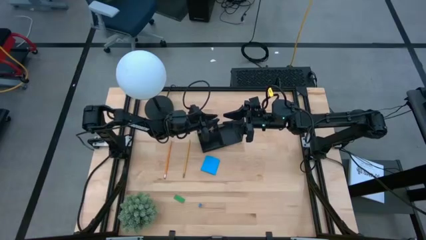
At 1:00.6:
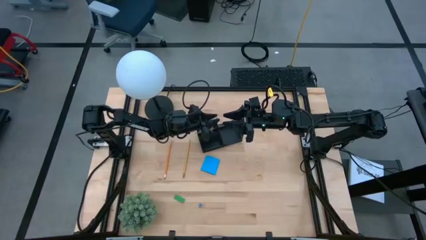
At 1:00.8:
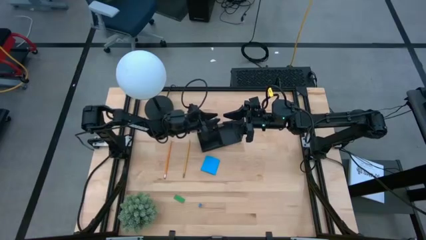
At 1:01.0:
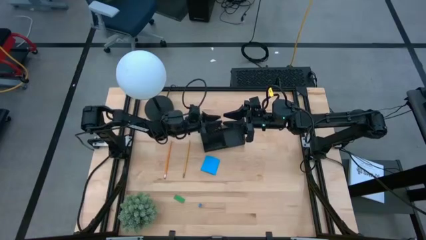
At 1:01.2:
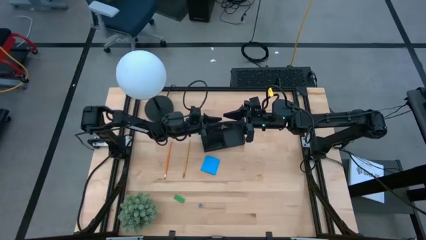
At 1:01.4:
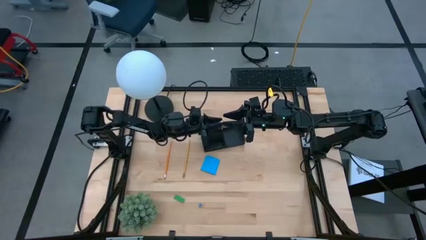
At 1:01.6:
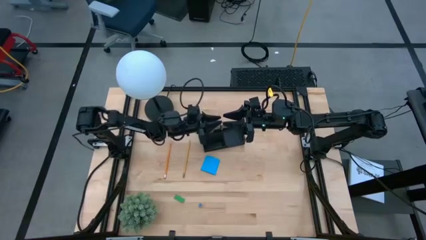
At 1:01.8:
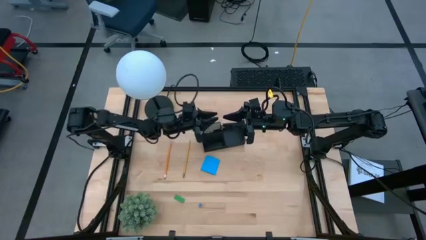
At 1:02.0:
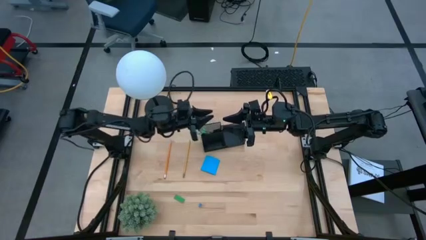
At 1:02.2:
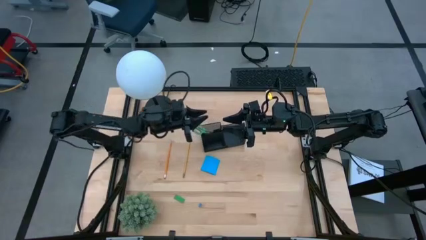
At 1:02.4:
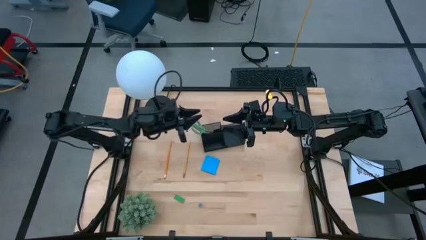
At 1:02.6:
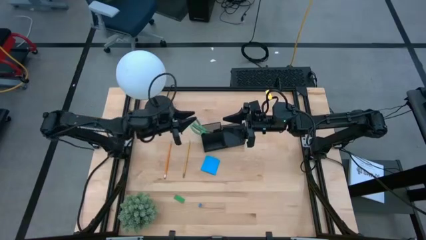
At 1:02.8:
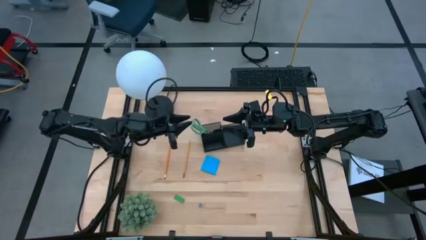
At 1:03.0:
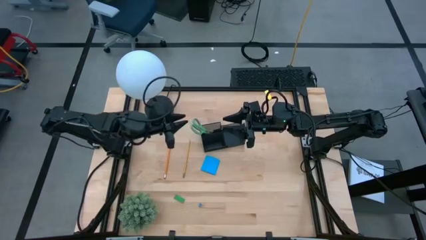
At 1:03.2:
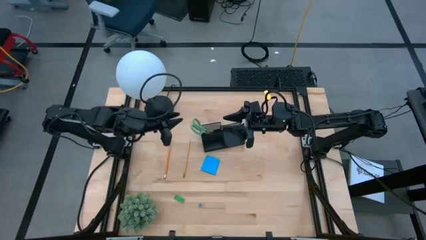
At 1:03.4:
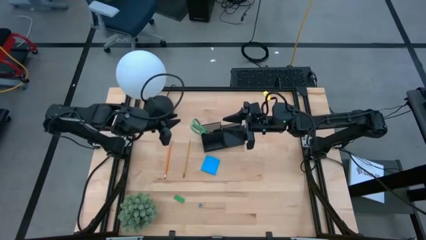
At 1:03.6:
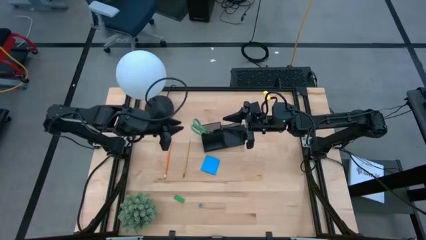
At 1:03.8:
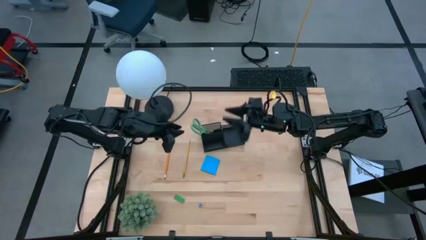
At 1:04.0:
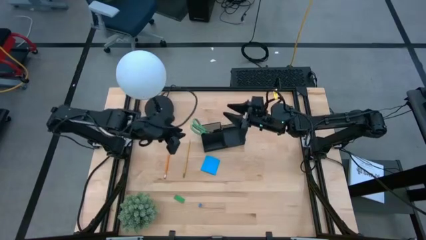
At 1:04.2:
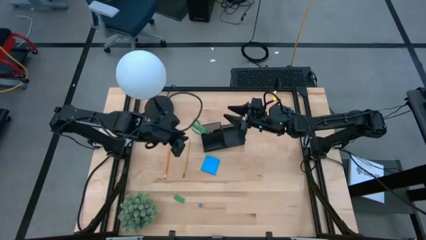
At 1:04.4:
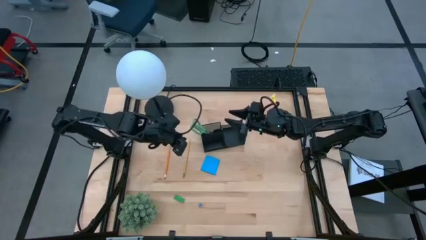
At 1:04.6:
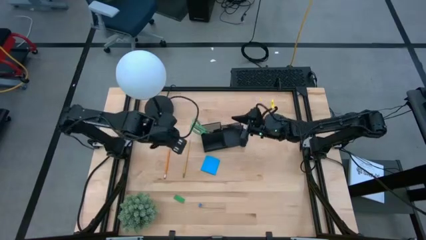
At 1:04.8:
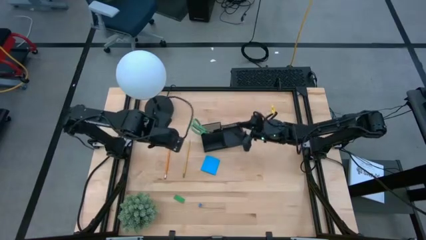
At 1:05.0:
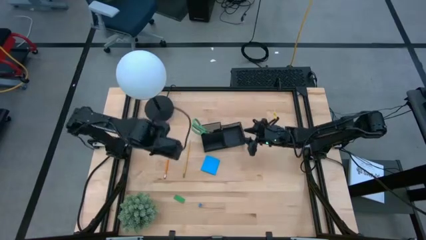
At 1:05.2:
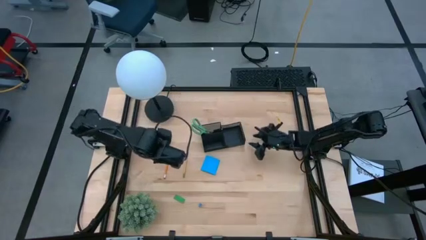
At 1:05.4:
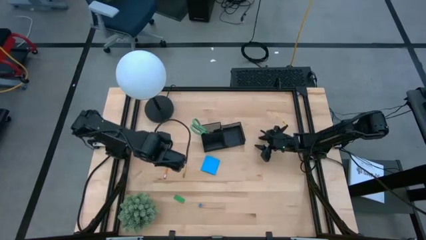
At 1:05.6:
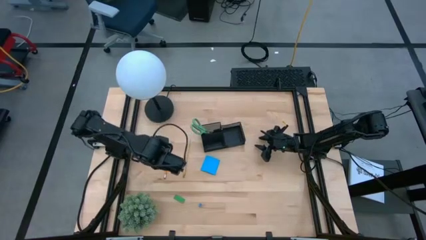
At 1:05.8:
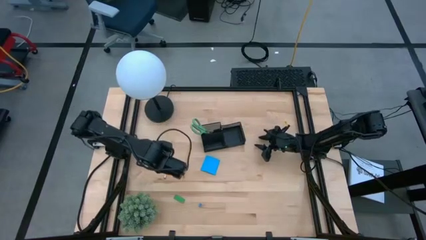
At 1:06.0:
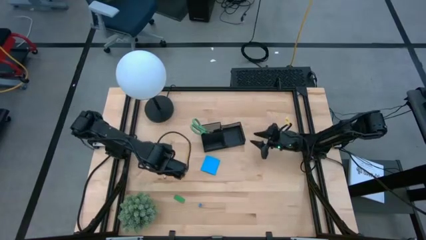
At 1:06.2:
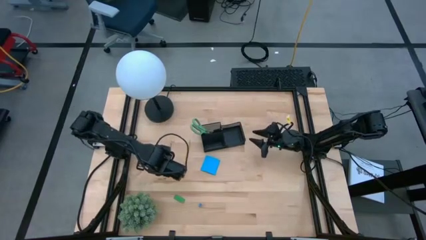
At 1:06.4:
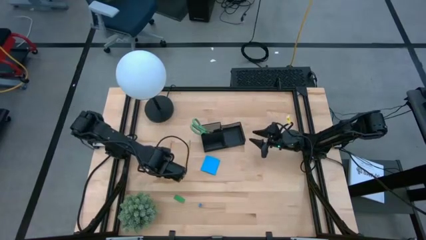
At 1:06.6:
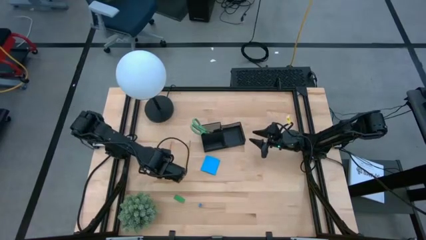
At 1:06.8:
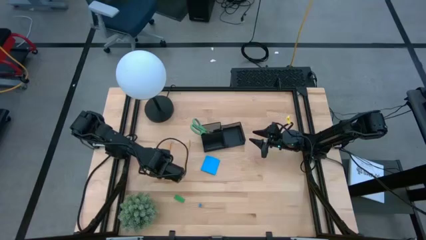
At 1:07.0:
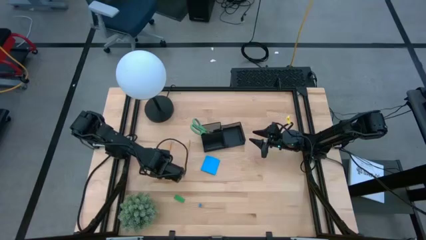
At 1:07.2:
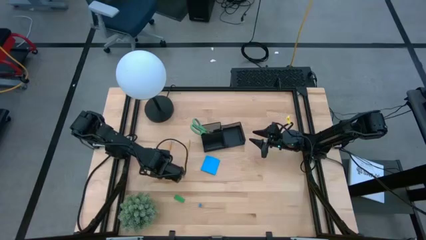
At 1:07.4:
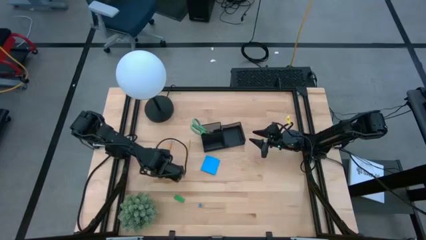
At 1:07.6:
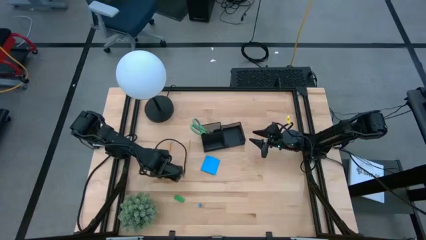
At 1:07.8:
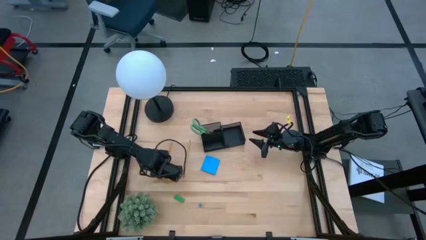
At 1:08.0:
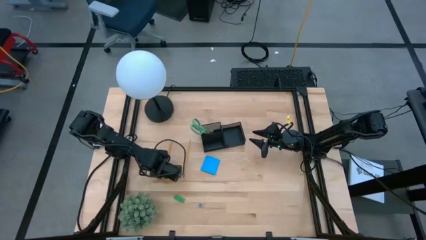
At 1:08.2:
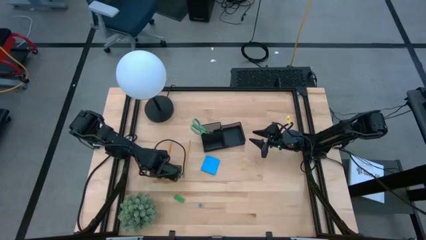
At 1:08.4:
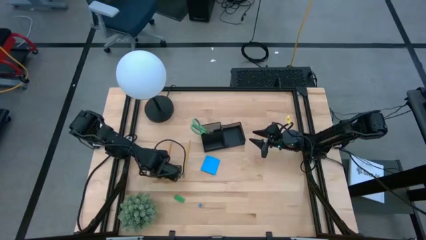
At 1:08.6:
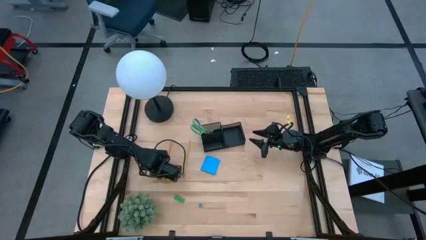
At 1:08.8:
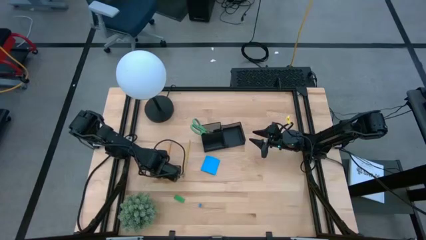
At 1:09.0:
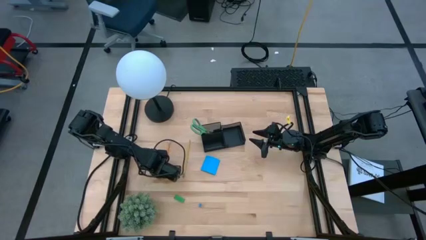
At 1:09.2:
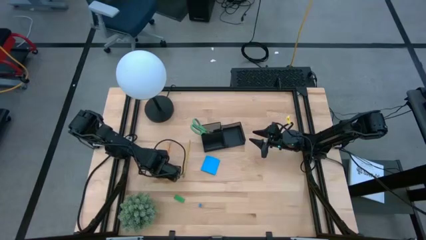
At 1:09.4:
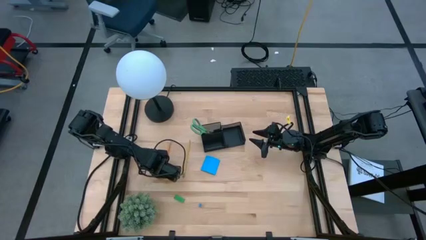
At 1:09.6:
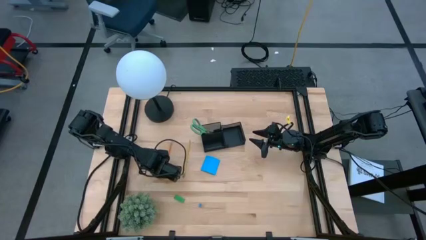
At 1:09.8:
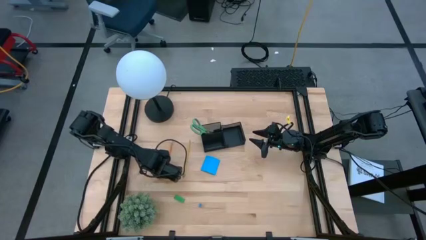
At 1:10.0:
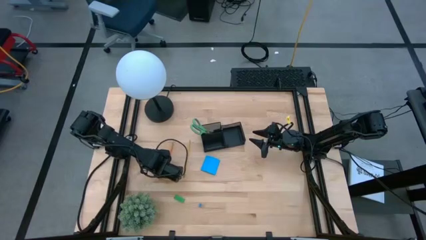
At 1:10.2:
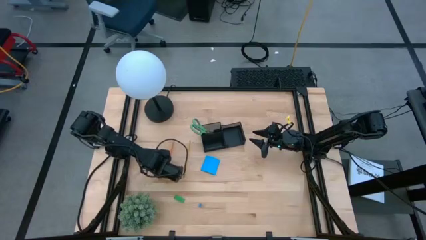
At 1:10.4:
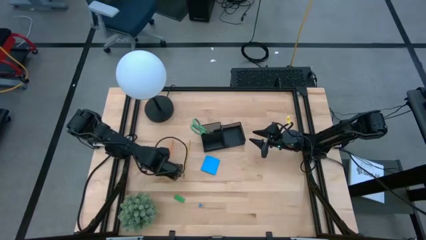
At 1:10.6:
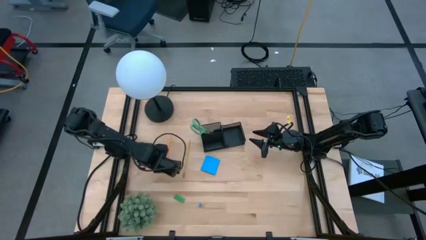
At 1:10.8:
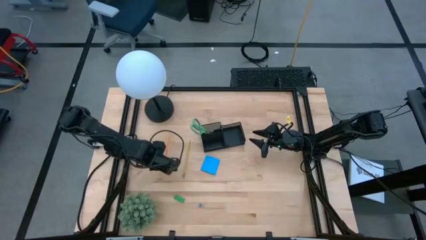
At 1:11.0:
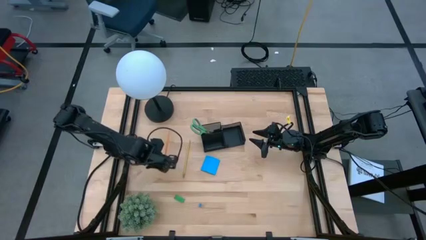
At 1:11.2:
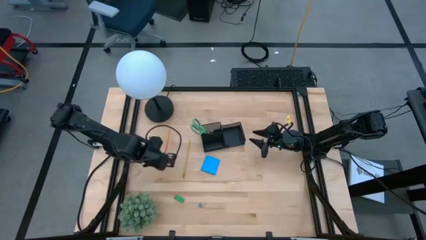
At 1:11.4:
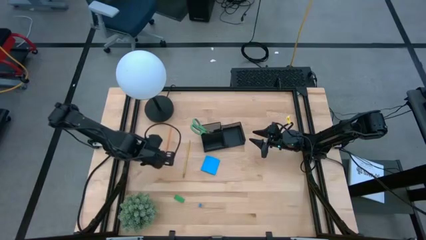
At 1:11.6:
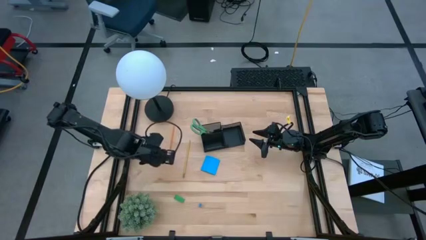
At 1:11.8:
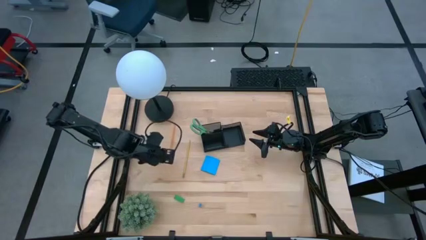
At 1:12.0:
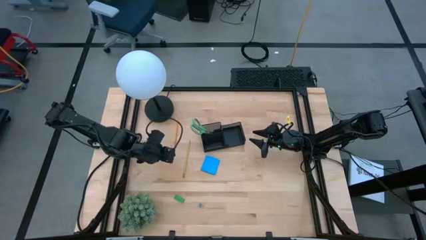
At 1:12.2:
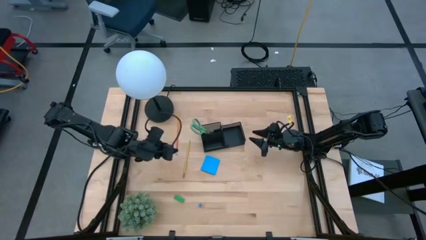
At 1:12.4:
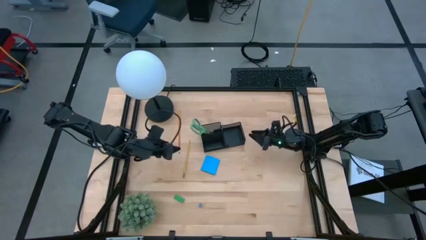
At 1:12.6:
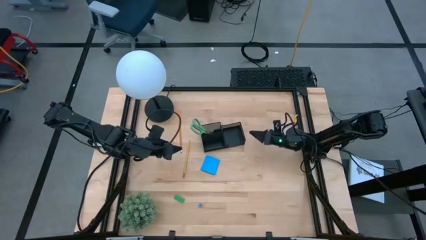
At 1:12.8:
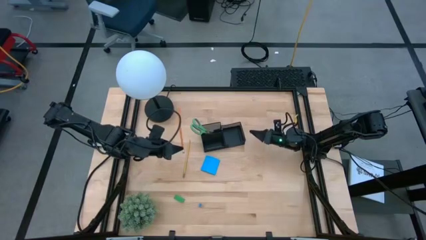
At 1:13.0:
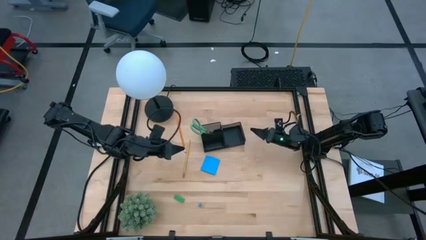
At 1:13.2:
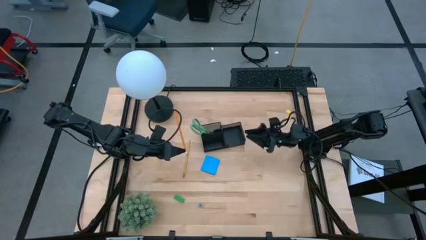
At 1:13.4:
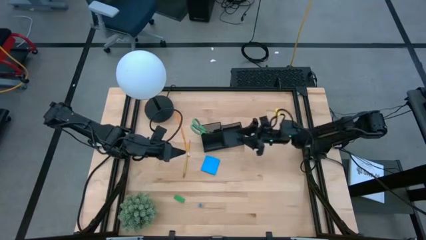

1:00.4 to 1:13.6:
Task: Pick and place office supplies into organizer
Put the orange pencil into the black desk organizer

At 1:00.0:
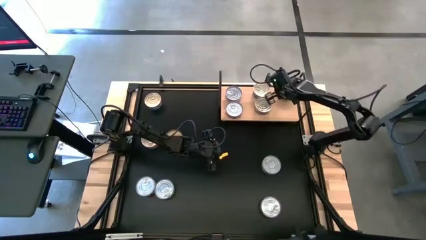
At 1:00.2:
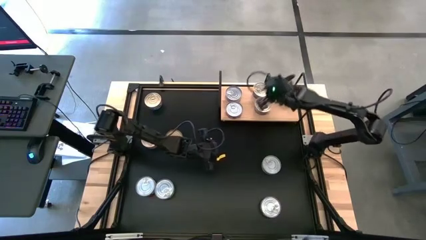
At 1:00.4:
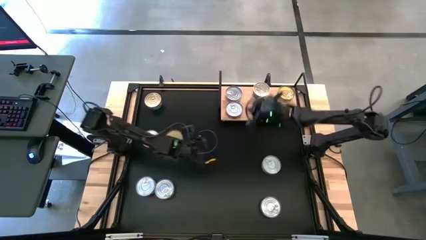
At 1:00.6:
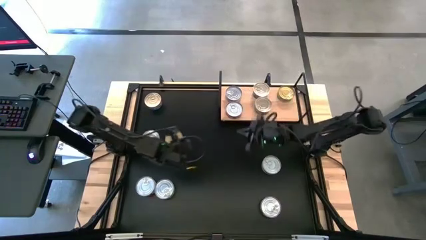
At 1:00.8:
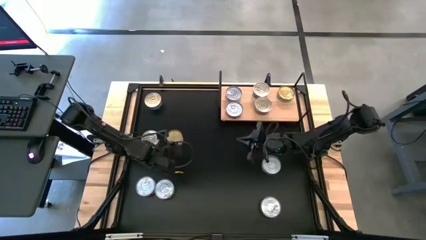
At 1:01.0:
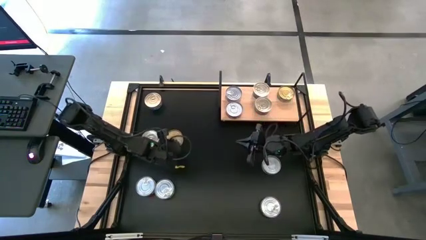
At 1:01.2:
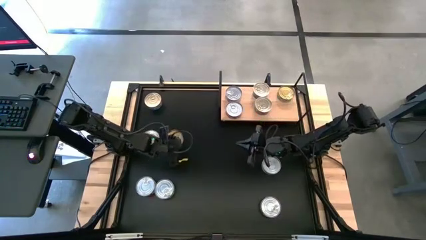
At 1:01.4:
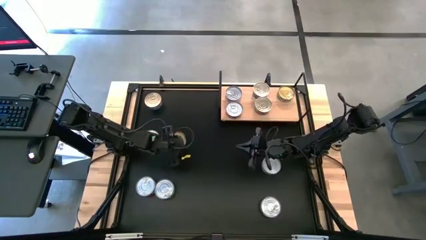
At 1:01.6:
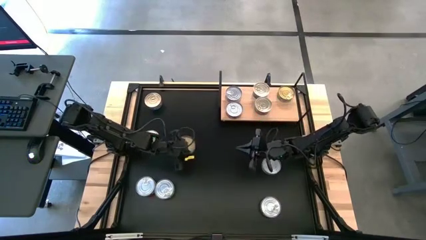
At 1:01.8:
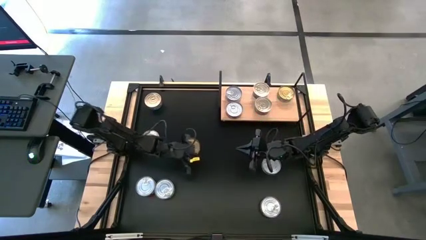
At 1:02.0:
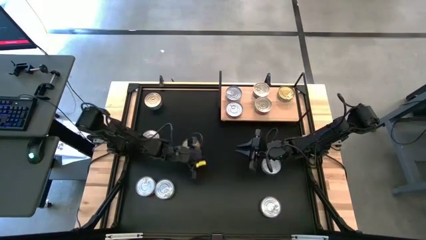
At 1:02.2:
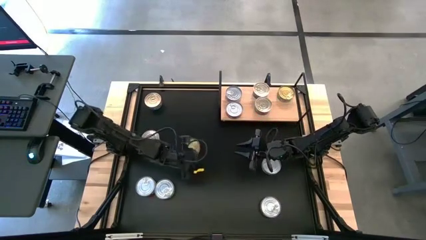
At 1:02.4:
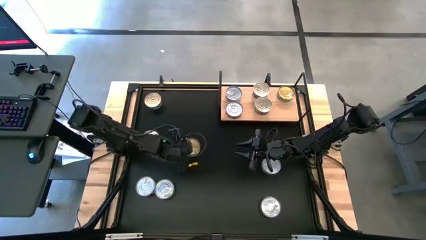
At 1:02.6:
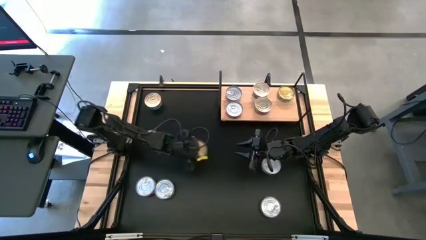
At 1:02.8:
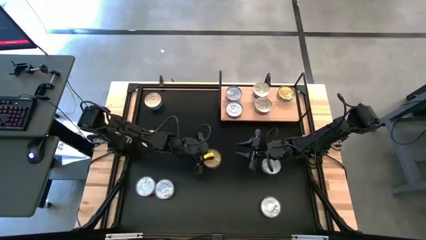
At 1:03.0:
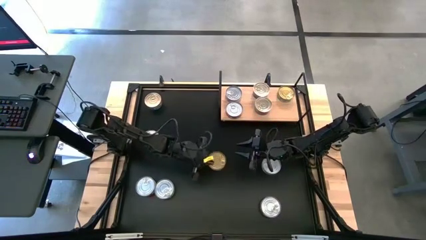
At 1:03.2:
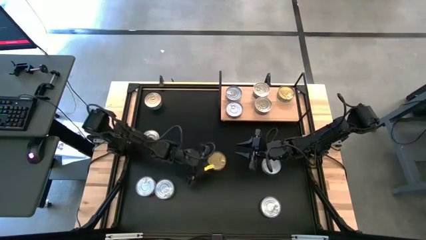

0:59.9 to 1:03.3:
Task: Stack canned seafood by type on shelf
Put the green tuna can on the shelf

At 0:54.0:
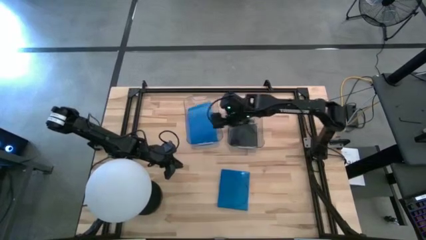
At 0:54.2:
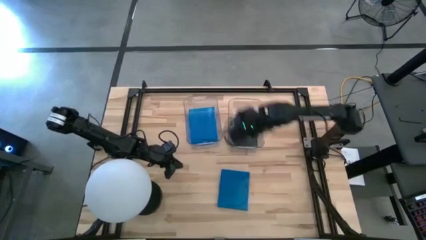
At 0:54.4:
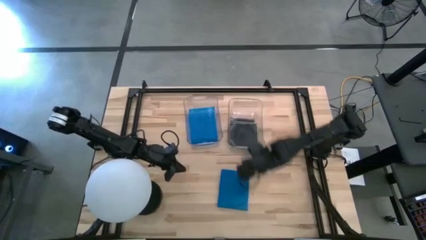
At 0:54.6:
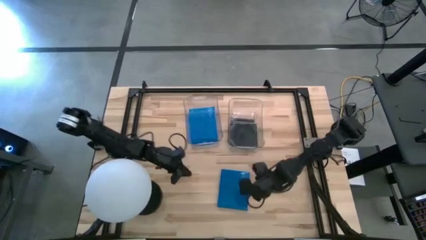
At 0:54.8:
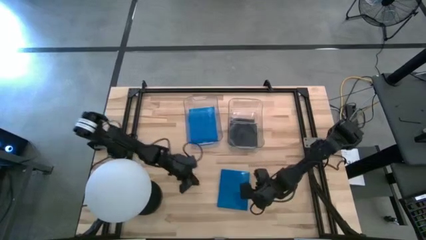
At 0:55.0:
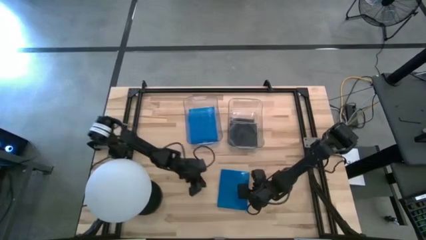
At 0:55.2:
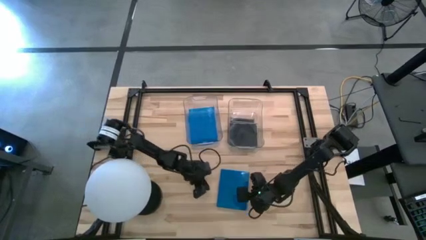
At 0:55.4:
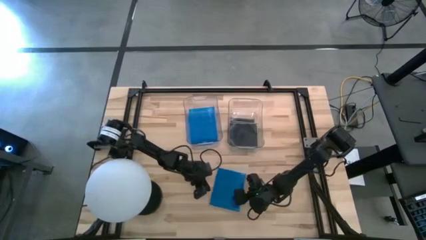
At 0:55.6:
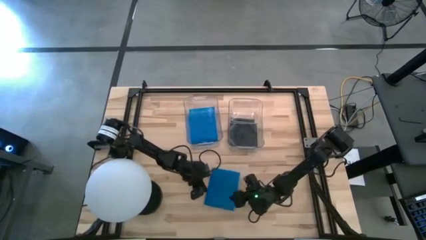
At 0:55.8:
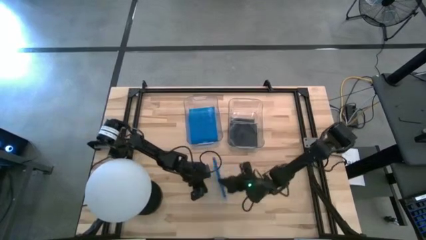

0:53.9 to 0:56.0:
Task: Pick & place jewel cases by type
Put the blue CD case into the left transparent bin
